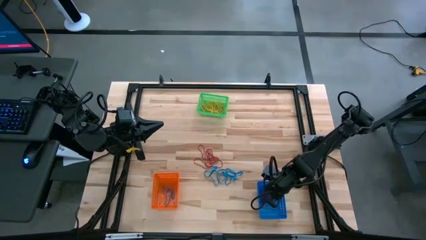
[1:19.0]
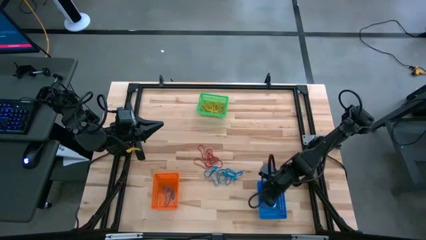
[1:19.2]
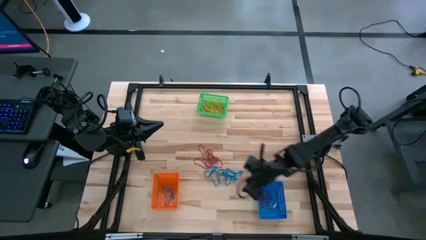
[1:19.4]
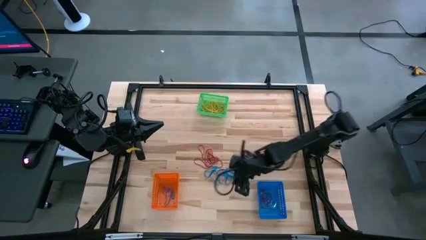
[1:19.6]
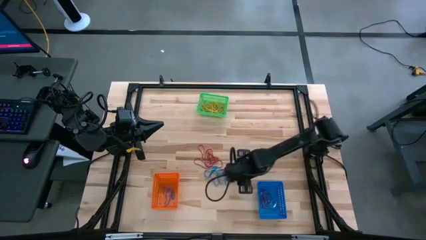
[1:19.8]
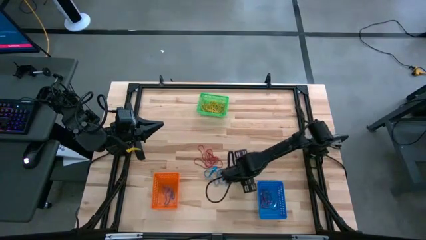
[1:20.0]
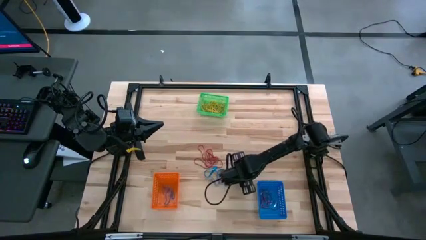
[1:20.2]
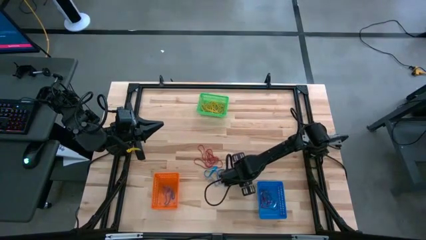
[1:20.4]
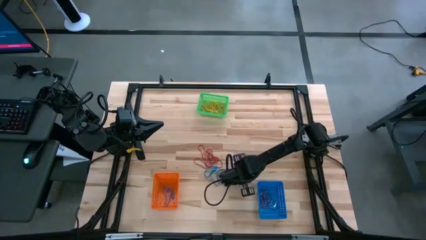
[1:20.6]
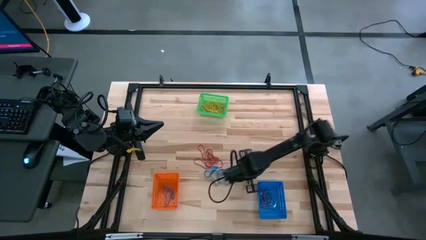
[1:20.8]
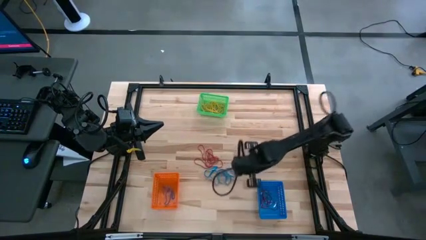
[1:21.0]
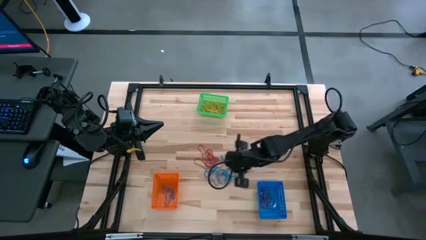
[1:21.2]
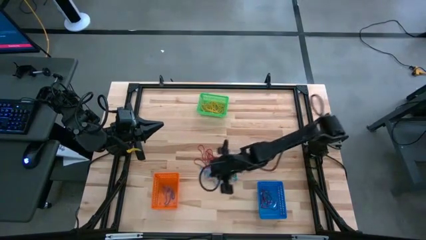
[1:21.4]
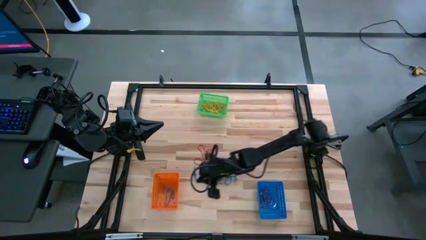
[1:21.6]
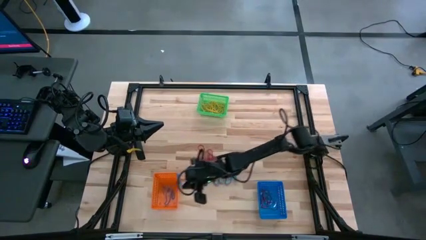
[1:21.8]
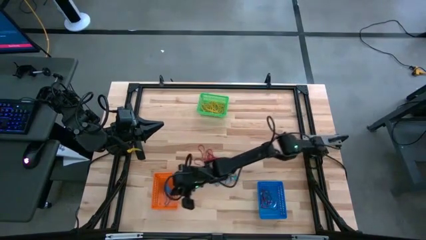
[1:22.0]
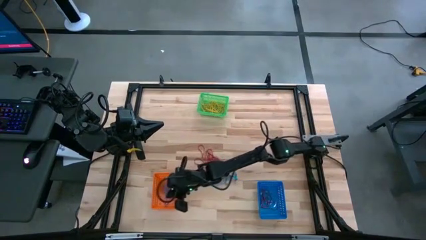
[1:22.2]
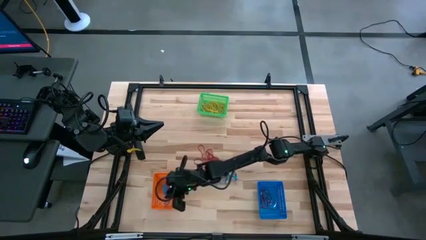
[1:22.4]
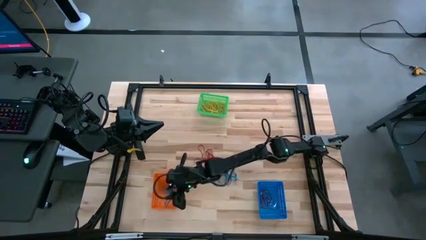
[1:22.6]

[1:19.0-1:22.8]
Task: Sort rubber bands into baskets
Put the blue rubber band into the orange bin

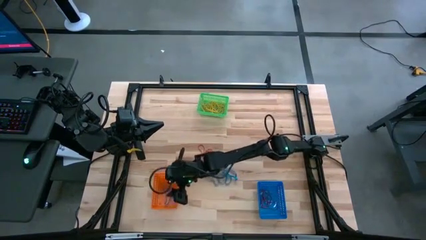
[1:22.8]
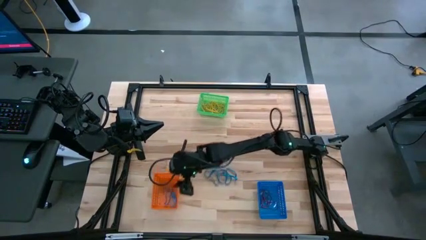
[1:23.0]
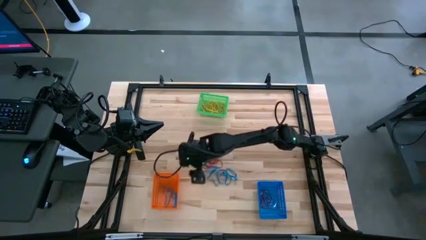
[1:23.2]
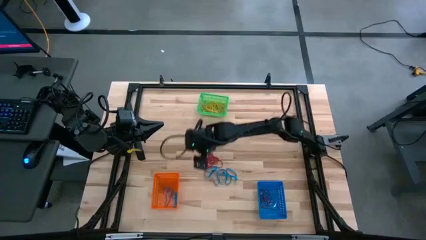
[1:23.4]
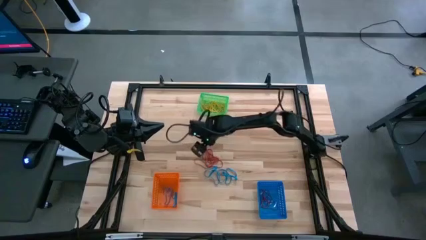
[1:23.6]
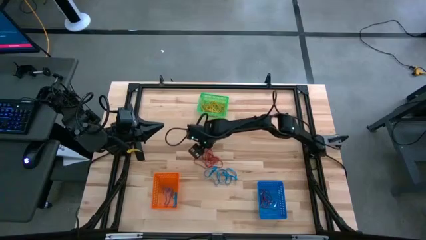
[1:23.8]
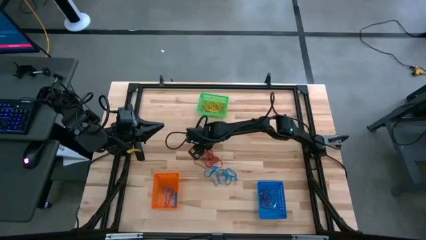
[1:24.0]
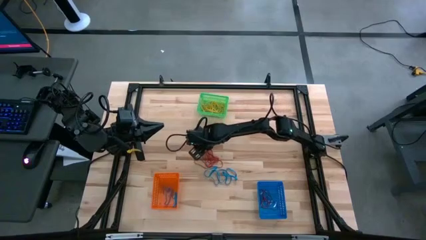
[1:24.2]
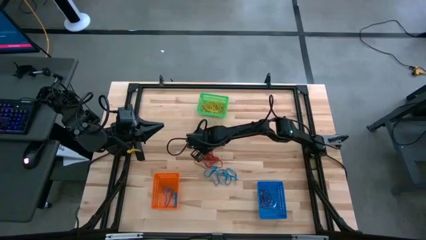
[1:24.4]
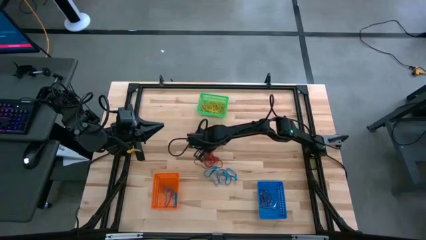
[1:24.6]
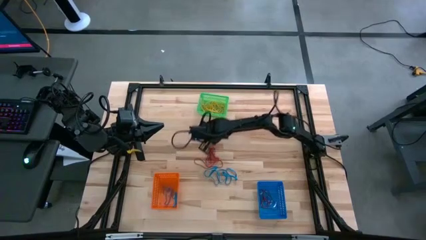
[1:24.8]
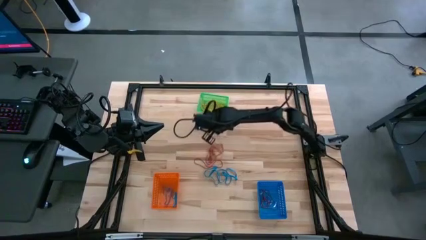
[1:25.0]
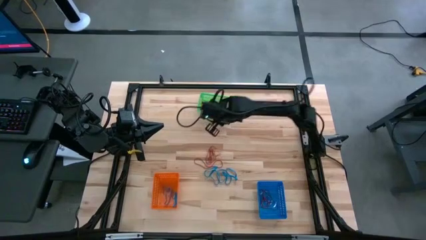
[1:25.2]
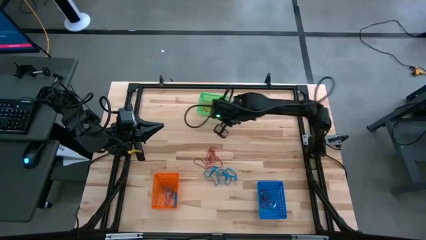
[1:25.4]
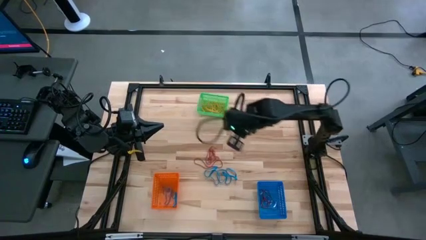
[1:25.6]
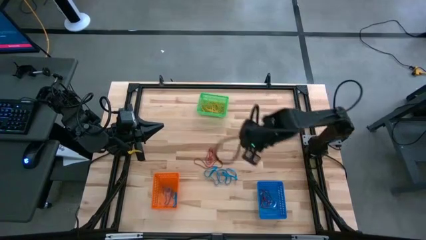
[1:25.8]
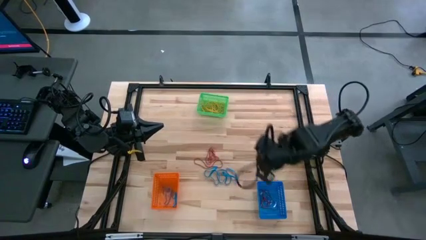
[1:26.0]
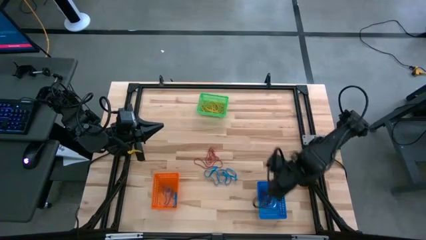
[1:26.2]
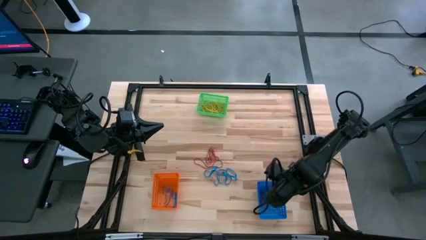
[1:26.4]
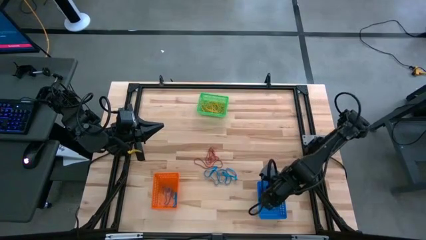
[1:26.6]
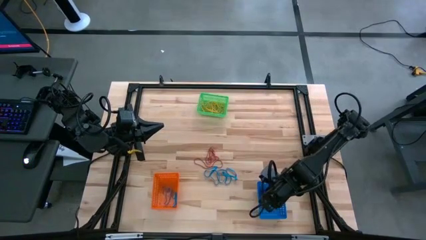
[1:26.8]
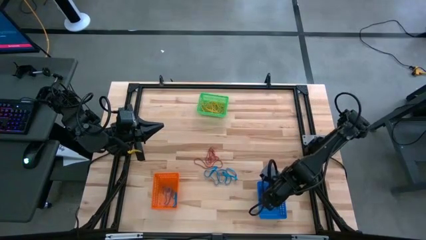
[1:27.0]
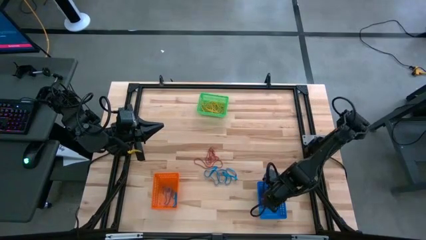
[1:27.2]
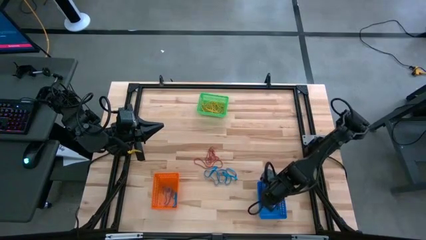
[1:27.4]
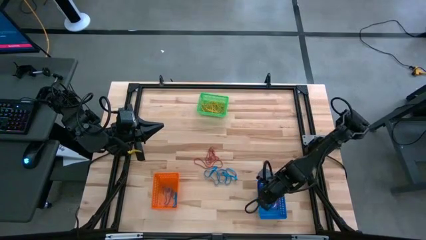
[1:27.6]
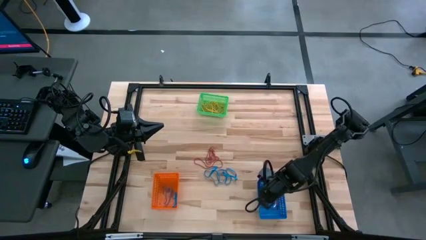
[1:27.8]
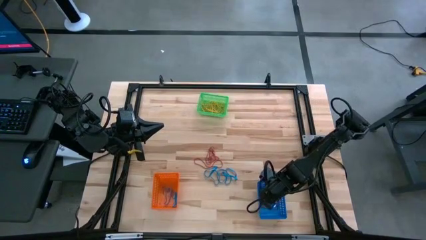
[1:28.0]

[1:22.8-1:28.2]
Put the red rubber band into the blue bin

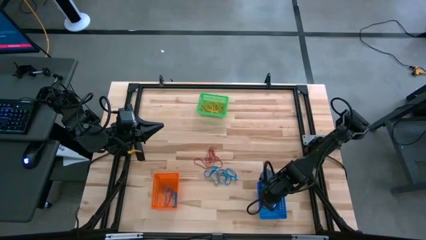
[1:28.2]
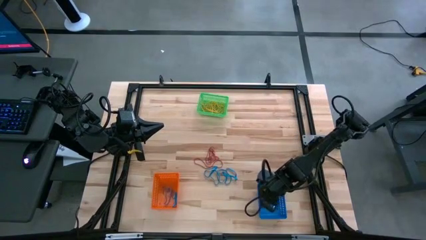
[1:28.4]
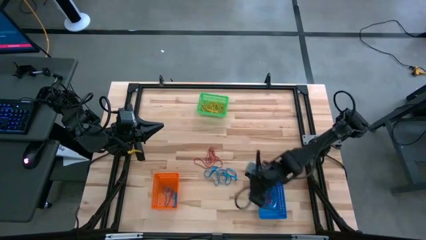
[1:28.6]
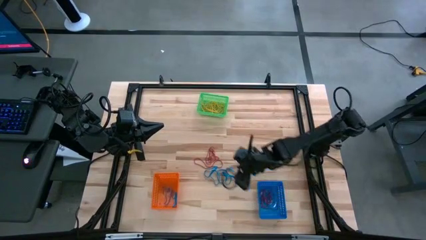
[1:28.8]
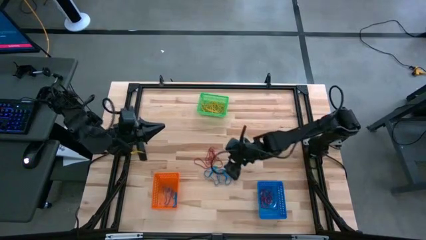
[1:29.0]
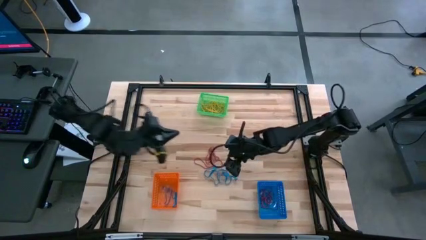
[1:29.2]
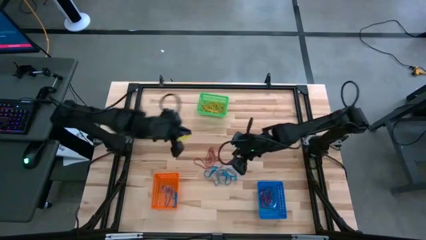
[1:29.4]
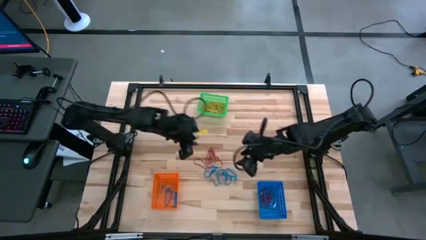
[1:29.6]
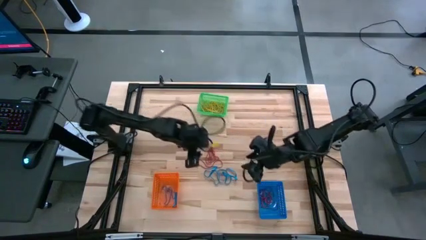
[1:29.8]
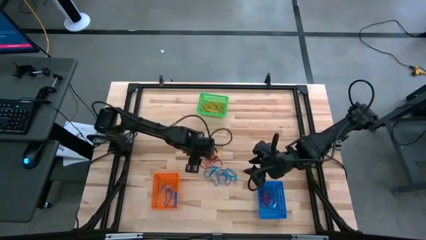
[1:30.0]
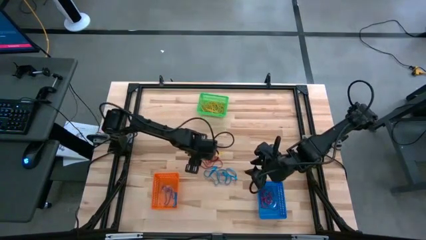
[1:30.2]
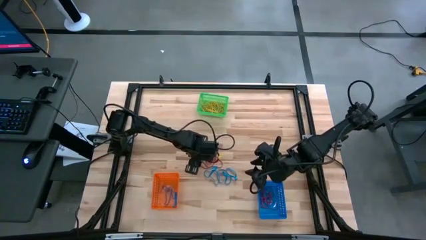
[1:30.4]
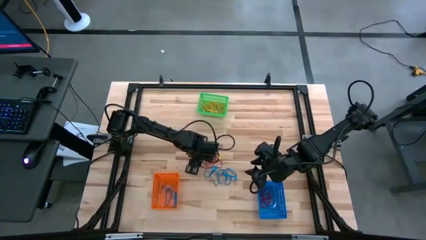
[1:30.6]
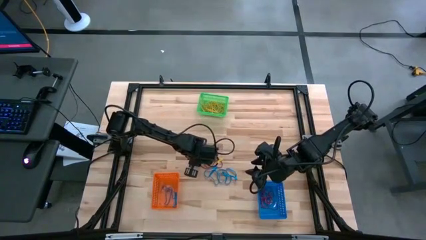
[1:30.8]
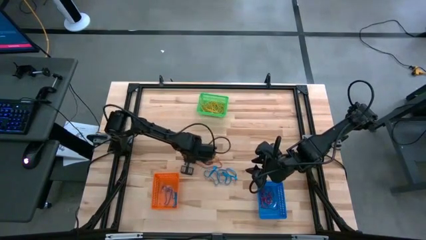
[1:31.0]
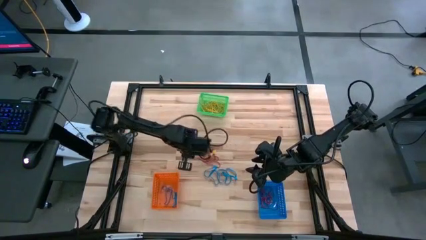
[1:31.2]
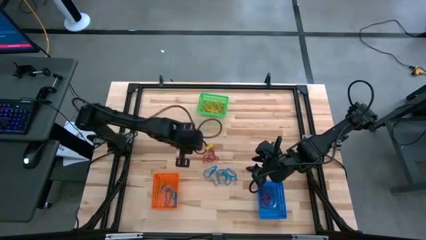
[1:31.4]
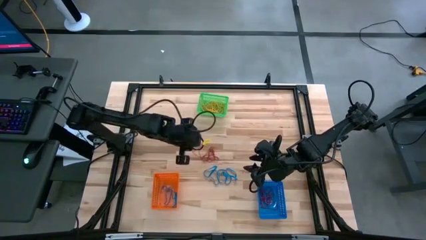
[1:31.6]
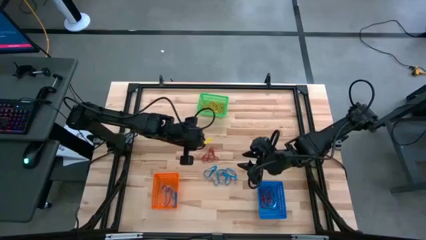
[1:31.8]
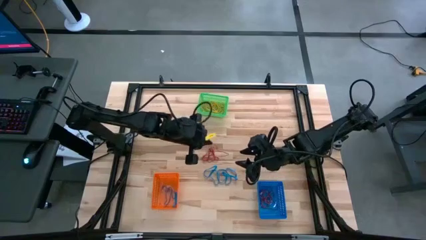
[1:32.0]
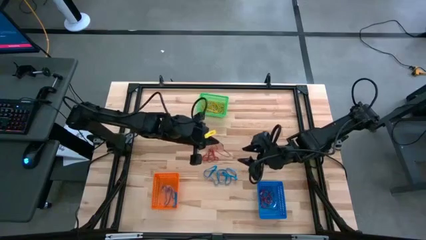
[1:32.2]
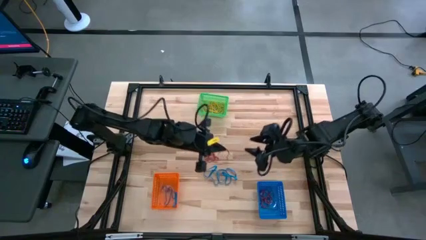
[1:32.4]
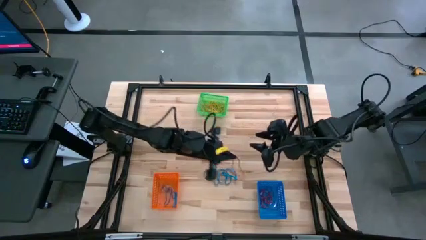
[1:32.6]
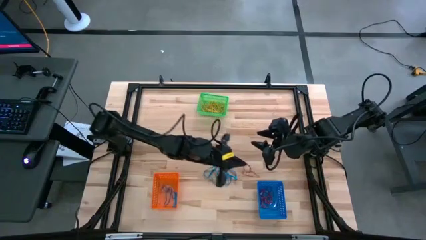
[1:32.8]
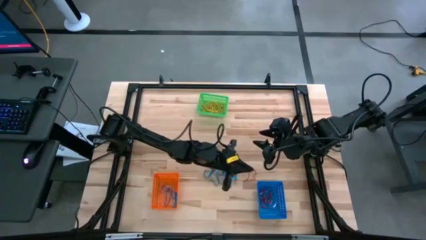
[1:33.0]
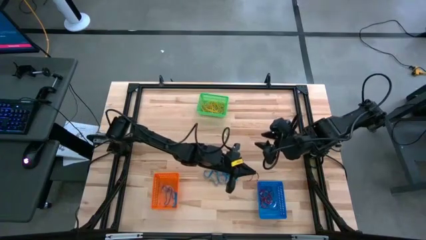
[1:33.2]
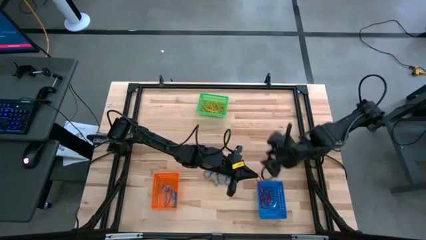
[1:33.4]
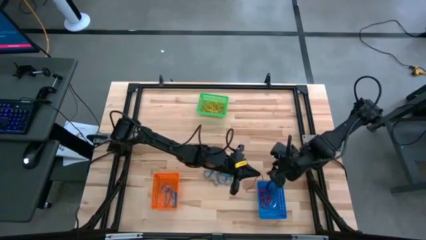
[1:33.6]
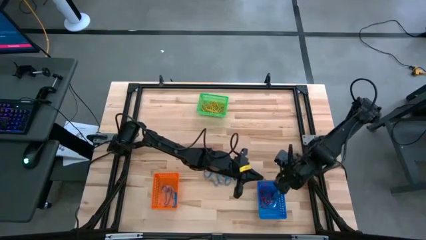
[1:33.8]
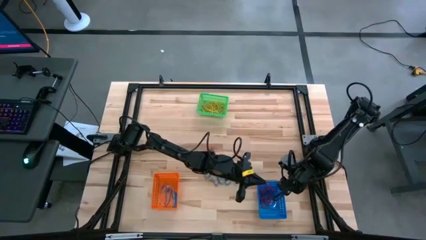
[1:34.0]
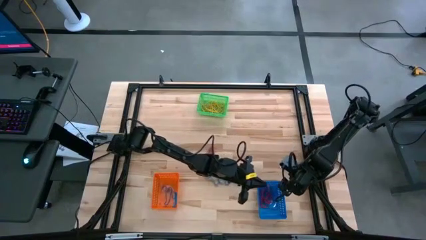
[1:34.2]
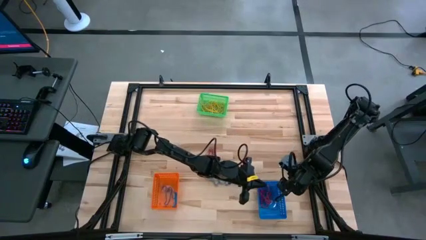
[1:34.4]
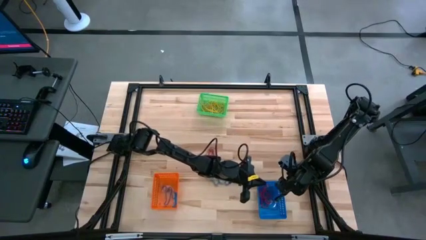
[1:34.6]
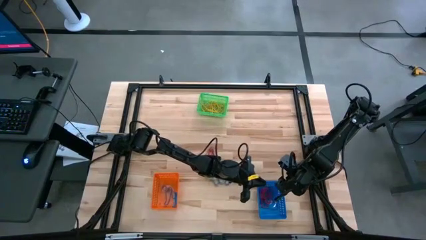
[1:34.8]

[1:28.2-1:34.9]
Put the red rubber band into the blue bin

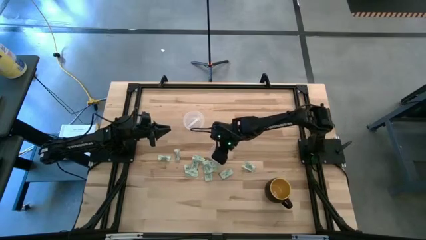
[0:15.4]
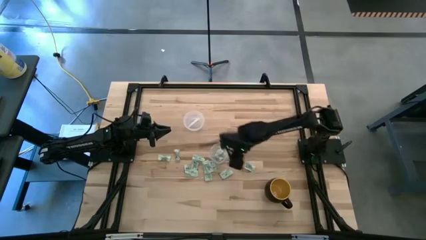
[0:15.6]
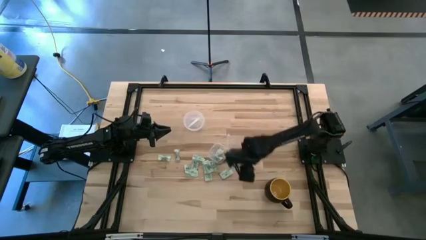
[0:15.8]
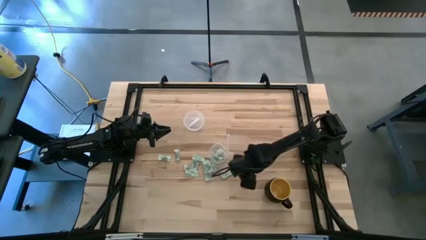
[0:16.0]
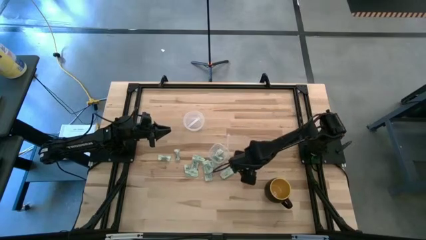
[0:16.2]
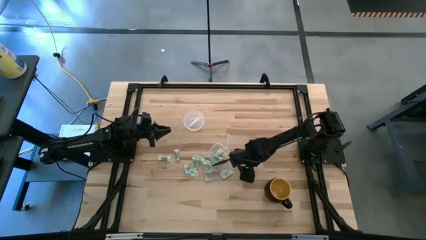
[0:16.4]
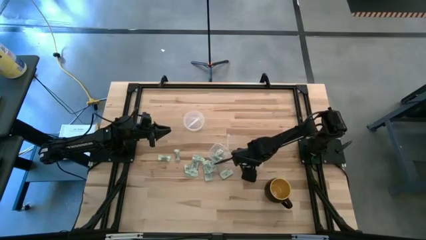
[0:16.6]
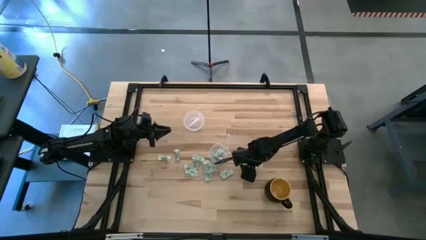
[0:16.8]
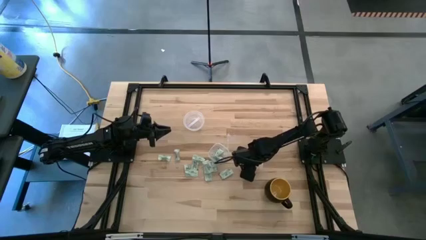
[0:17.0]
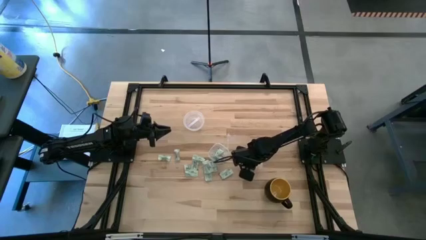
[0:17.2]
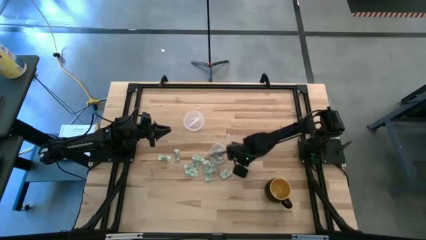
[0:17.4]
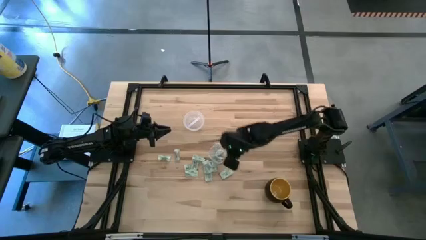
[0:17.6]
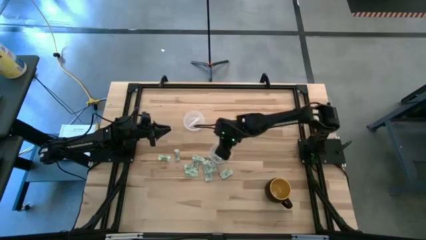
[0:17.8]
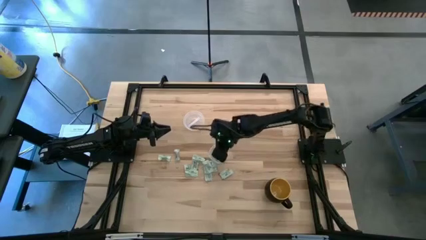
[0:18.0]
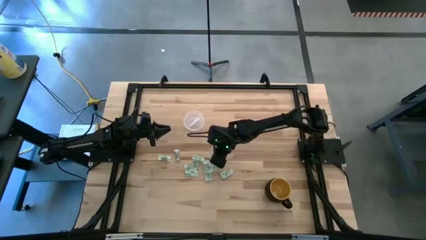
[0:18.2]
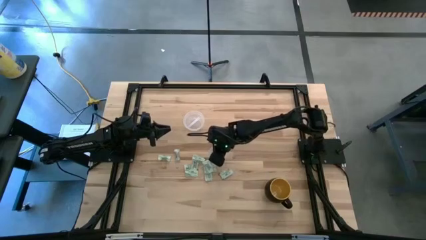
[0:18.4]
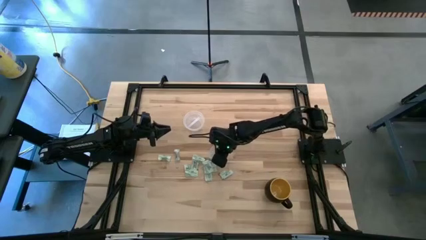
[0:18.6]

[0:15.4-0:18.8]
Task: Pick and place items into bin
Put the light green stevia packet into the transparent bin
